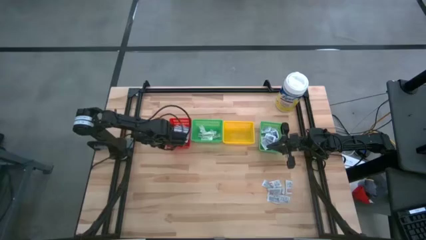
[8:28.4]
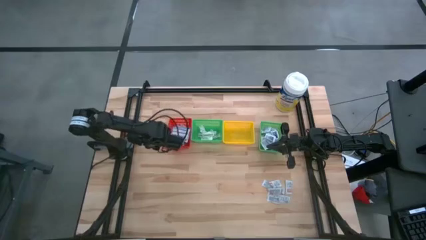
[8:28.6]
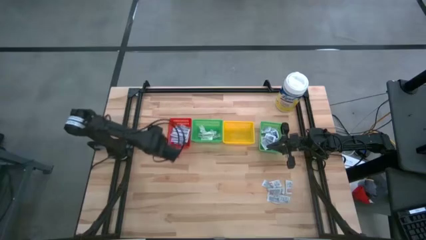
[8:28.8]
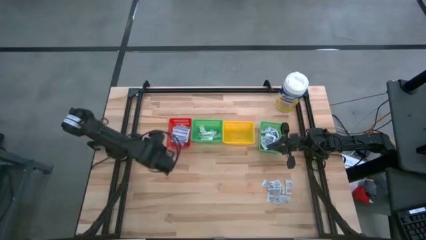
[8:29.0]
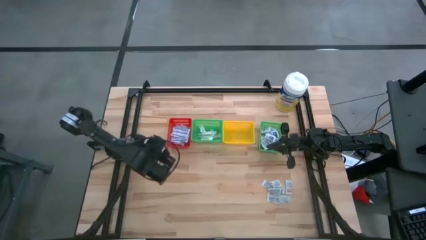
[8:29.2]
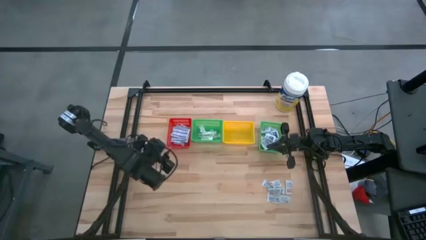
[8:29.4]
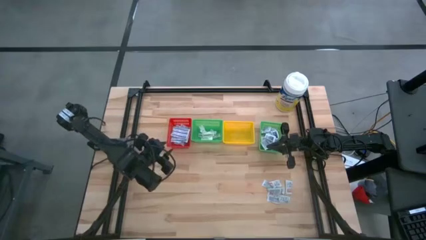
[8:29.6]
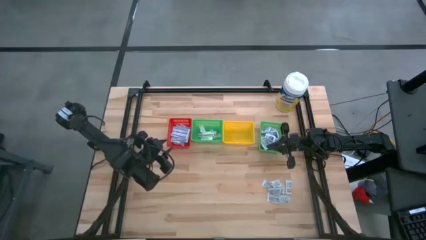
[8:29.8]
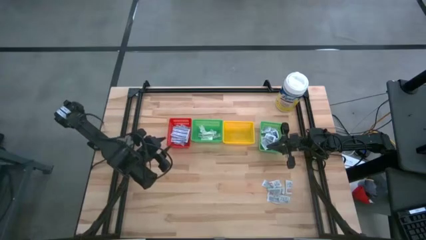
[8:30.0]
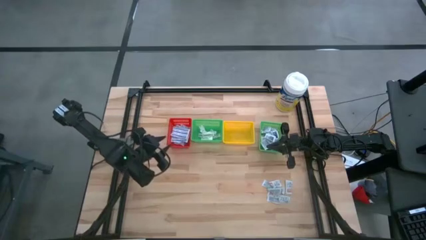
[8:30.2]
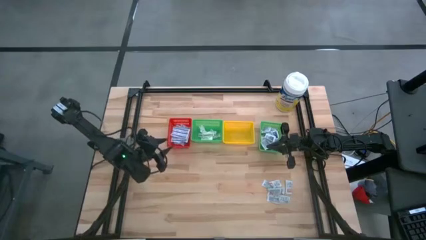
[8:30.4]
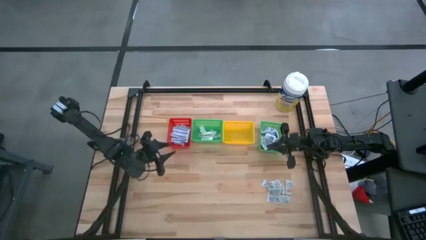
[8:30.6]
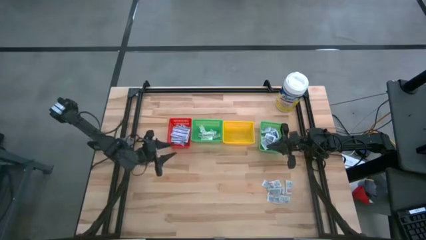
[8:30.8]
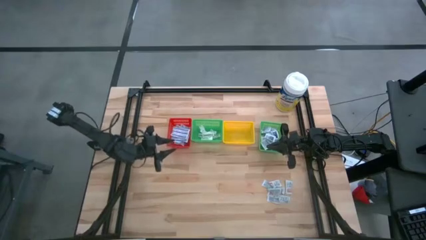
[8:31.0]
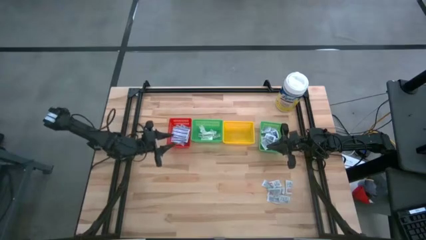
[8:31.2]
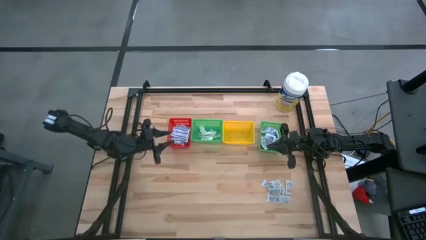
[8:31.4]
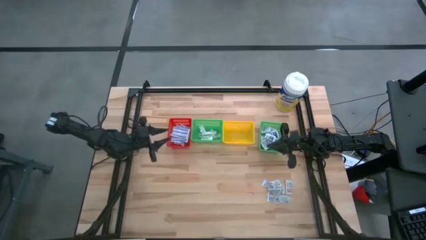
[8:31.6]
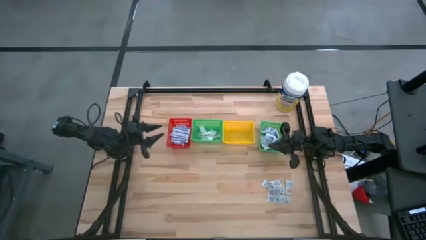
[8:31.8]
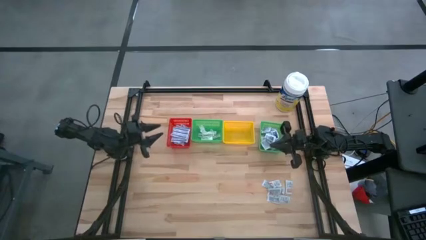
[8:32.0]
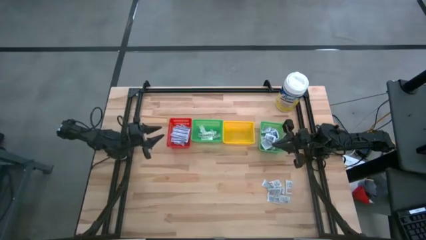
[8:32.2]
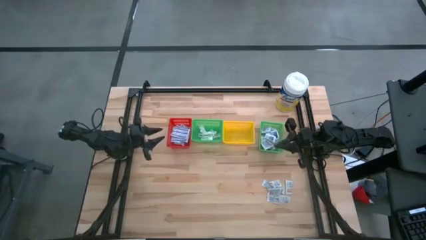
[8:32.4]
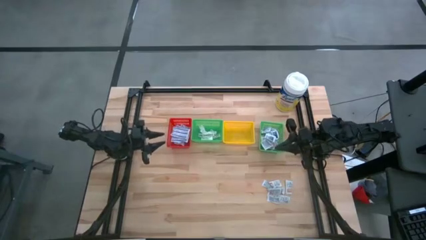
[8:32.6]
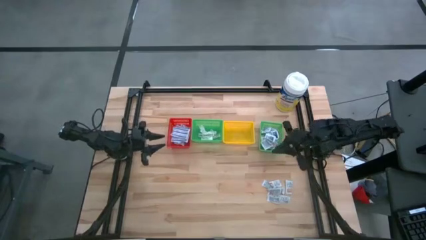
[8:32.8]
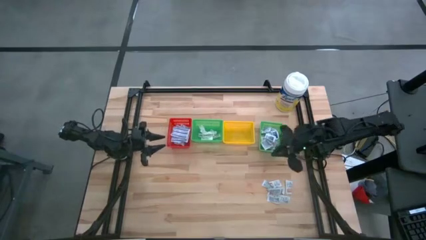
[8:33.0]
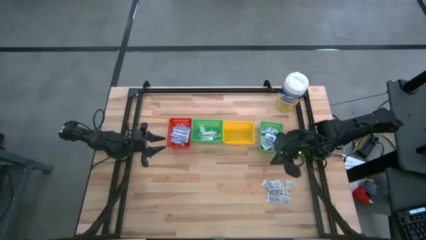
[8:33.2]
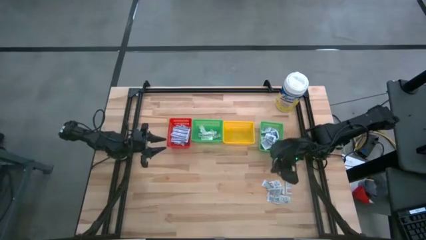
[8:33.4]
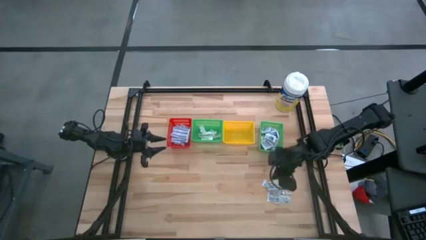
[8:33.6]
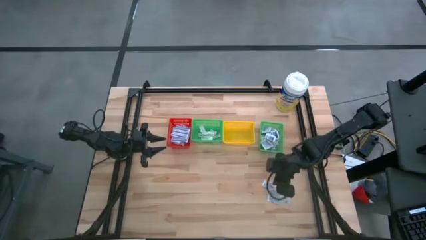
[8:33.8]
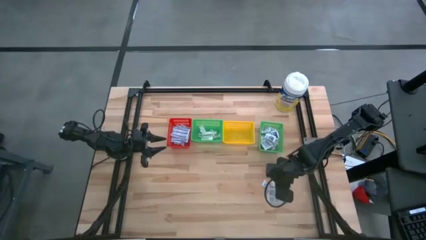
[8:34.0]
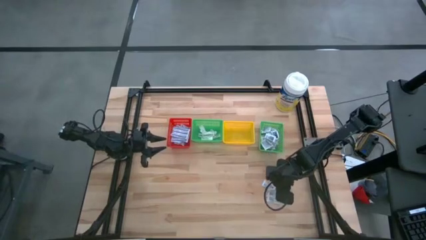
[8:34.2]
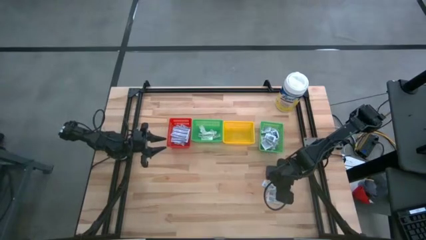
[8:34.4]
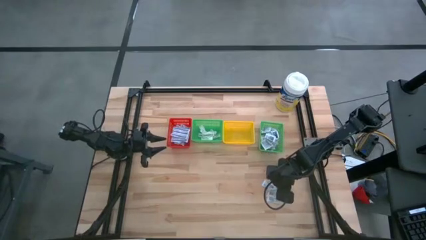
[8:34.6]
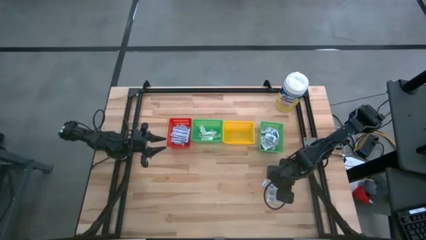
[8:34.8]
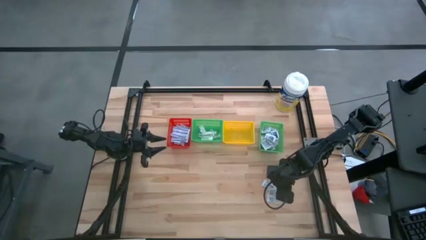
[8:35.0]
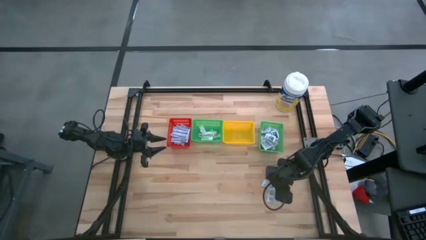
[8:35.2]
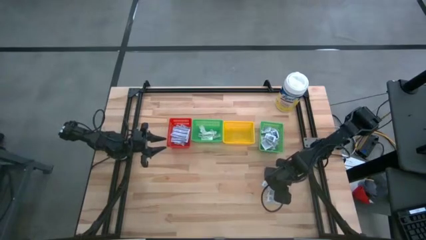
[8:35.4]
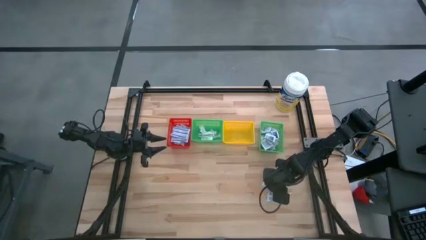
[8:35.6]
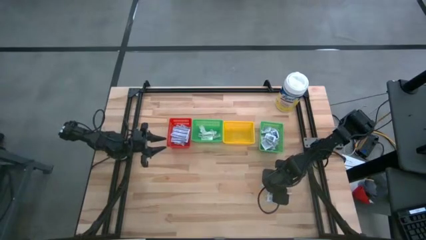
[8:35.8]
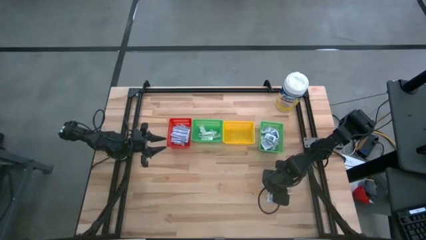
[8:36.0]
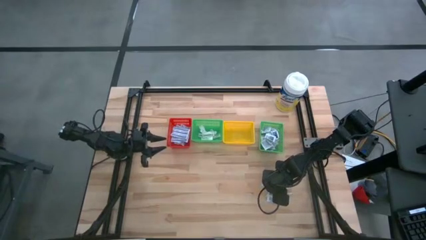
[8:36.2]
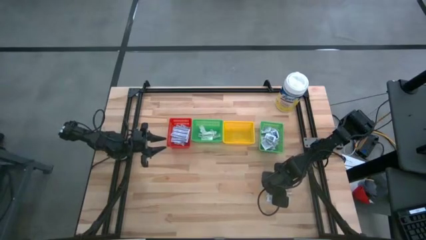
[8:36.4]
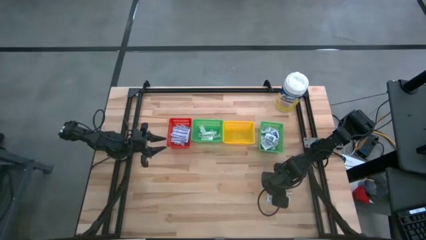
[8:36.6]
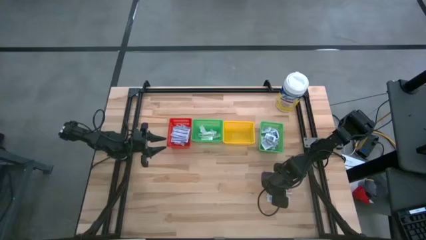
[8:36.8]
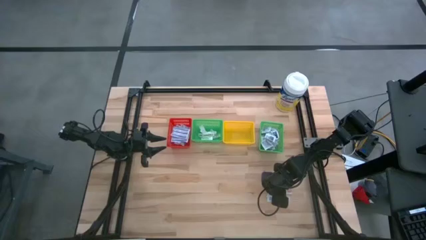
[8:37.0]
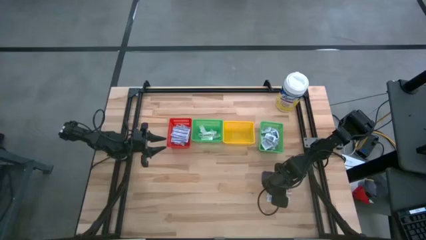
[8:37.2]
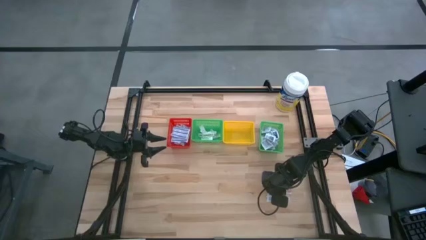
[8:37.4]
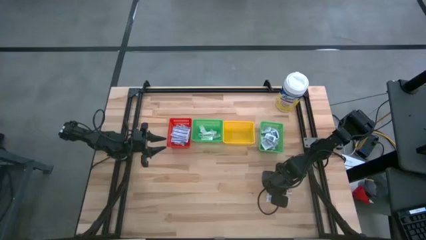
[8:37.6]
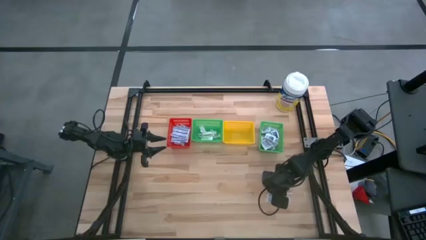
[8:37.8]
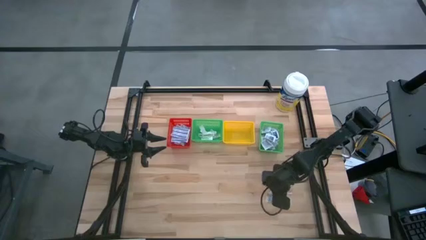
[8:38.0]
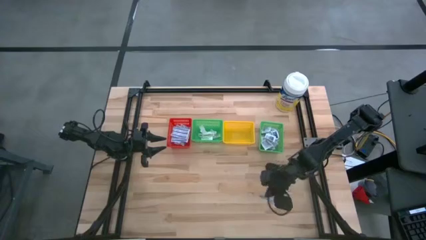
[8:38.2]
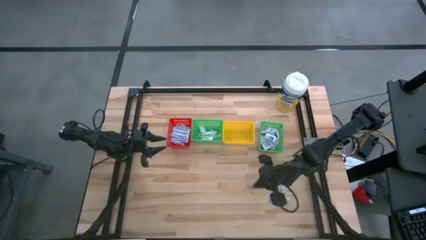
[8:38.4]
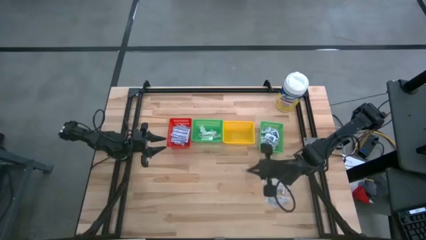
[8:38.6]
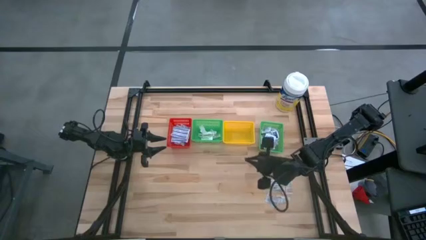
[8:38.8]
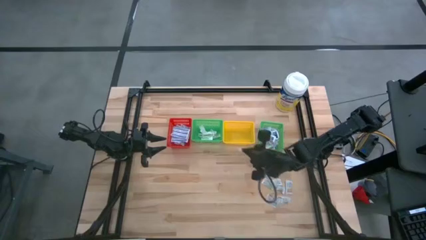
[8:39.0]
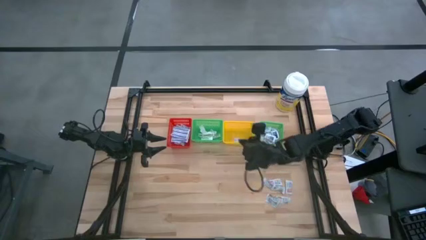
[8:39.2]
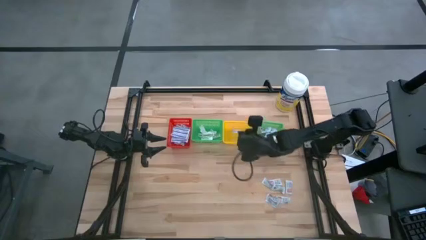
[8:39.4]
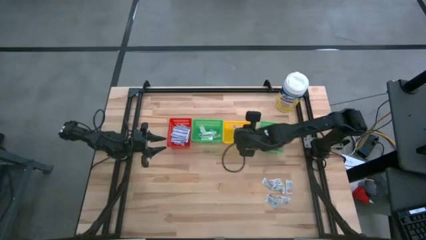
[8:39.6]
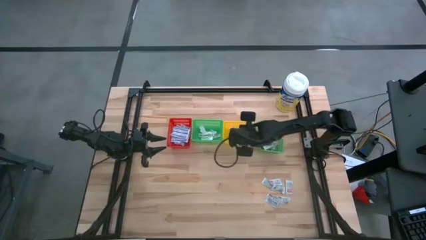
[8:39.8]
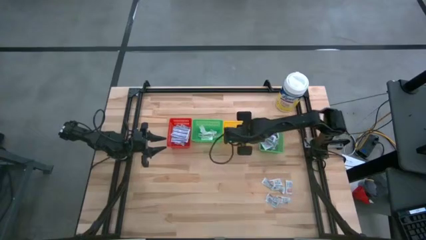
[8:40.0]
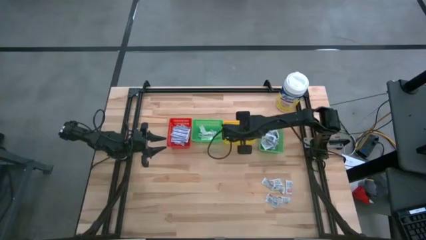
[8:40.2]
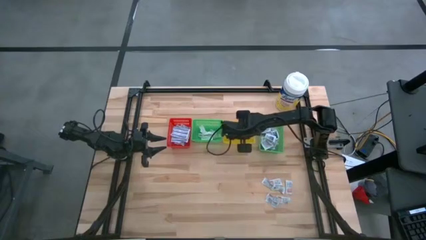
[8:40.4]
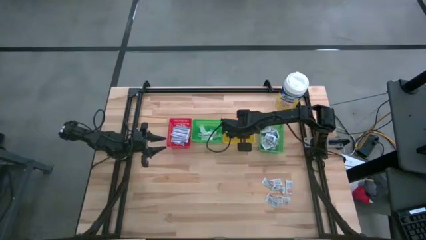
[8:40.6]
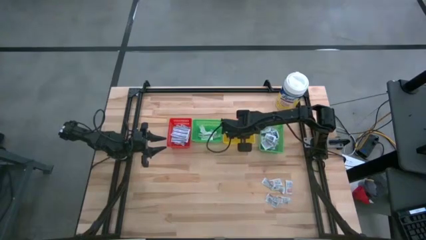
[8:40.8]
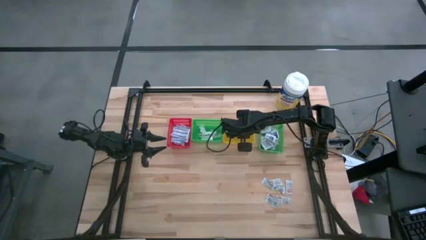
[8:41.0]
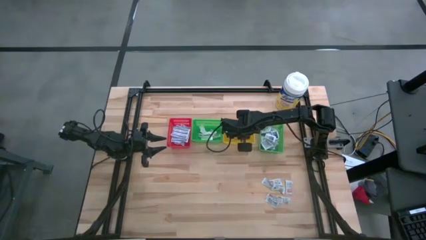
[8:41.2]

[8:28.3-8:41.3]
Task: Pick & Place First Aid Supplies
Put the orange ointment pack into the yellow bin

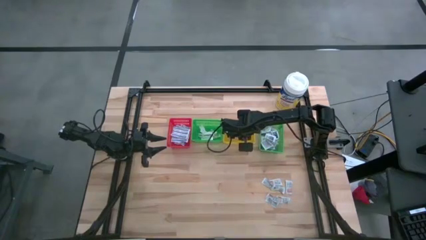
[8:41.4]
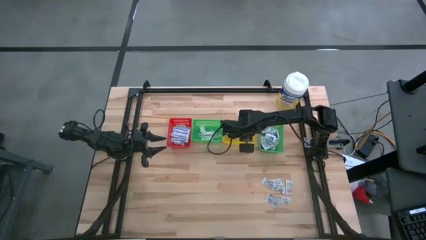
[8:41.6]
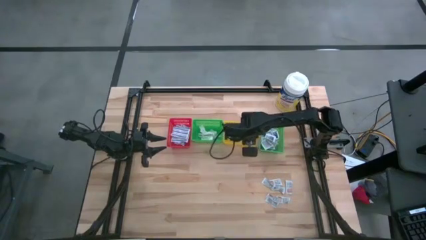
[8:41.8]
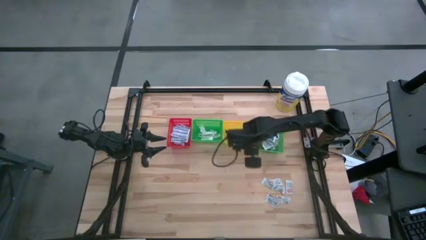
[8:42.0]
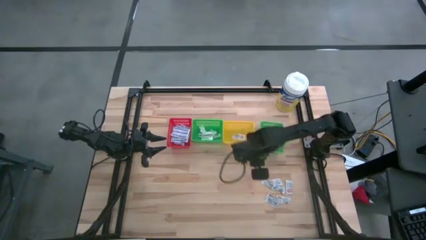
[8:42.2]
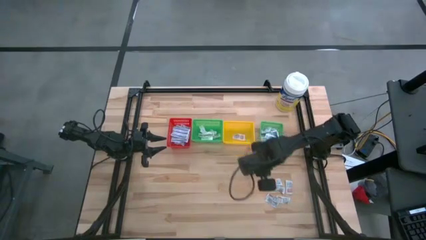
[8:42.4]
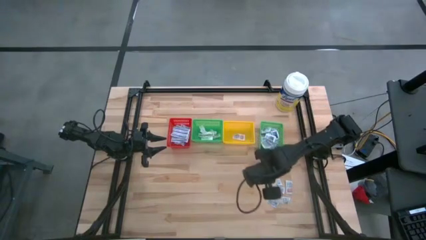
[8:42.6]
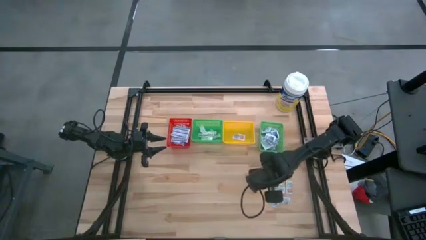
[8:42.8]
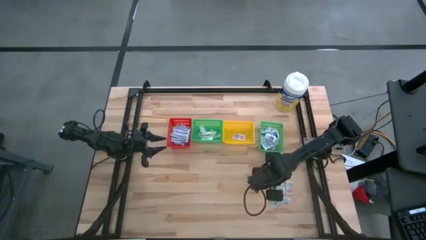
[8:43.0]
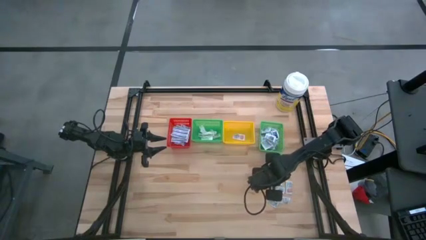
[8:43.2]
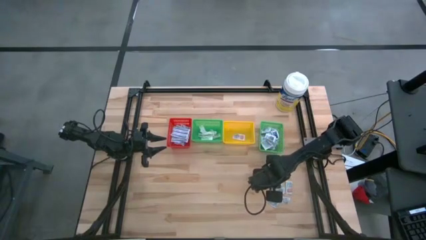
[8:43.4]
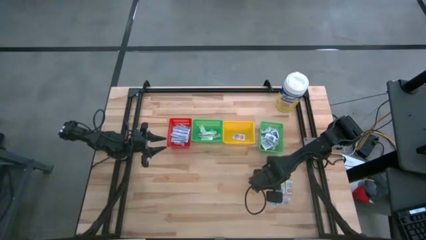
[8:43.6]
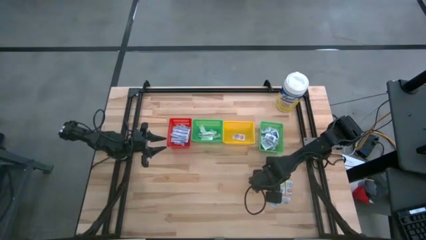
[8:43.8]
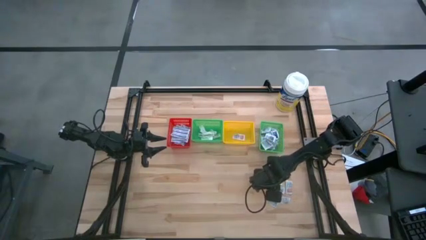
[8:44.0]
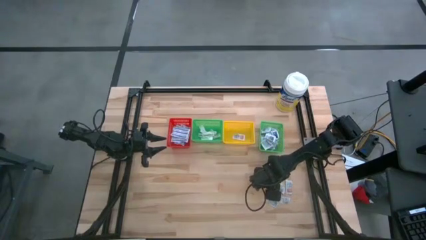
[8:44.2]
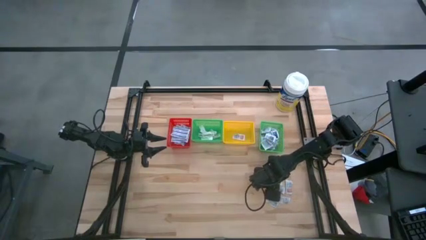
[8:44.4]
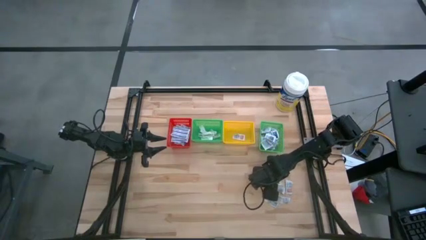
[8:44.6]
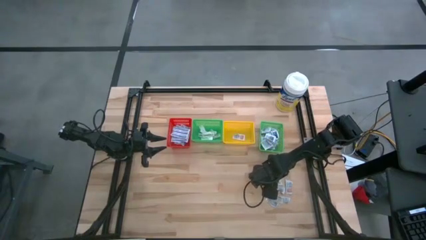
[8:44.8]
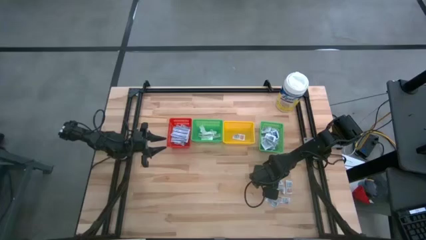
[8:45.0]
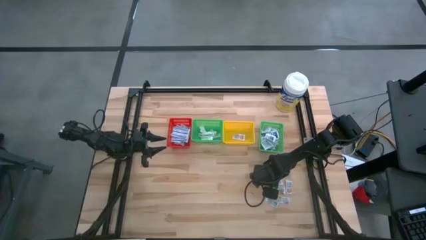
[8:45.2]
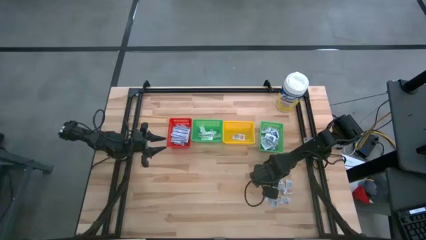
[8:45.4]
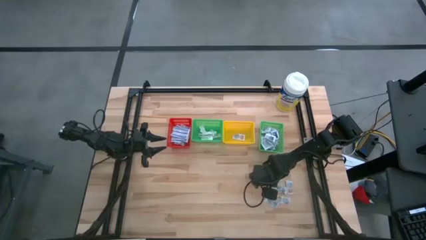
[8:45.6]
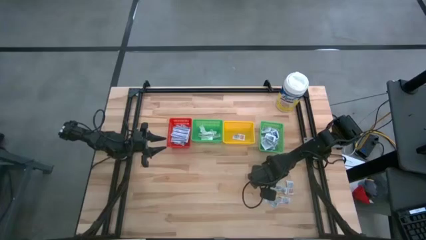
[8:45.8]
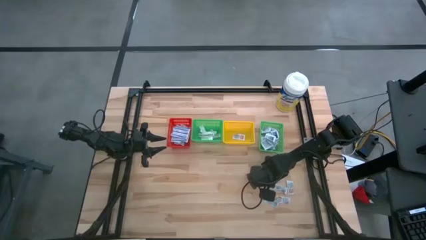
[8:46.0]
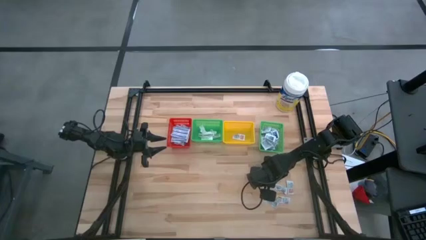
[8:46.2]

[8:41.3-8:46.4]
Put the orange ointment pack into the yellow bin
